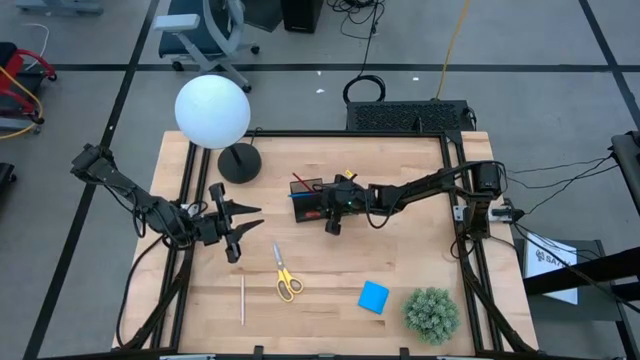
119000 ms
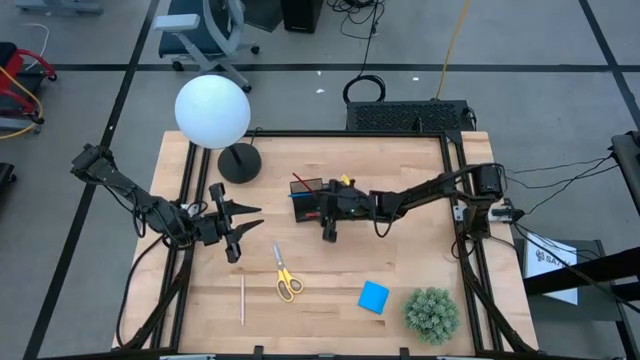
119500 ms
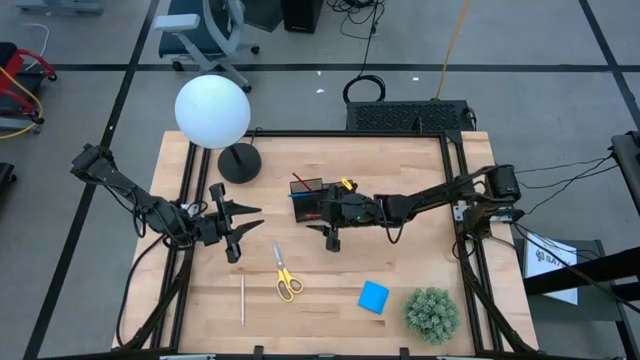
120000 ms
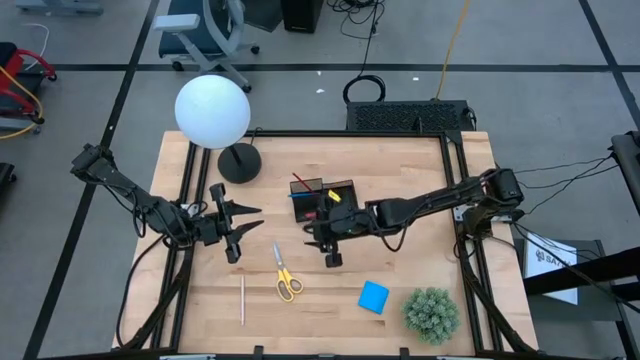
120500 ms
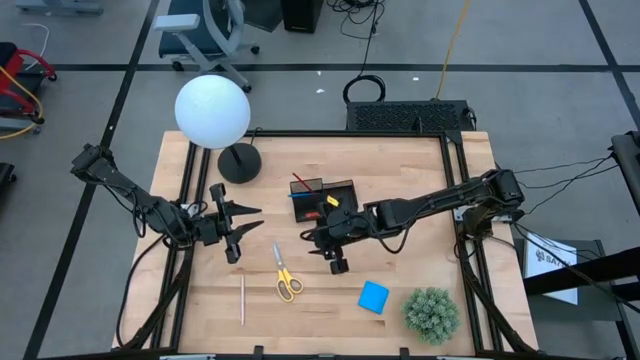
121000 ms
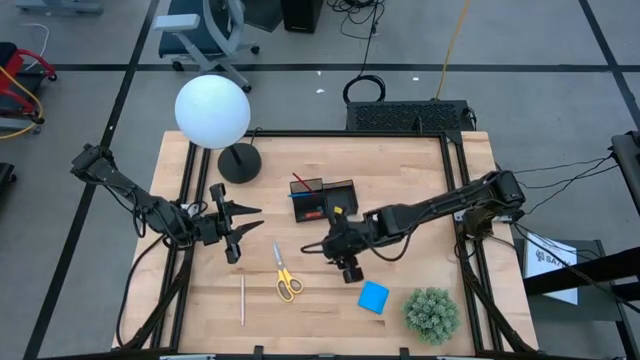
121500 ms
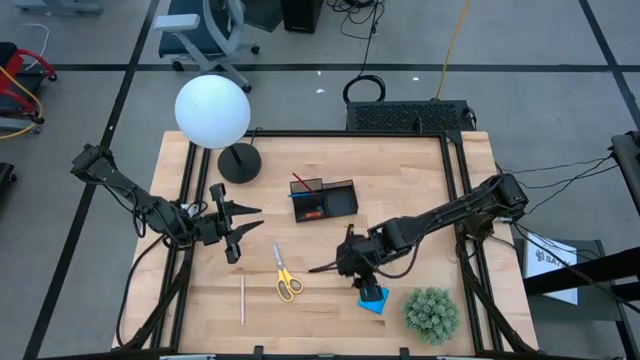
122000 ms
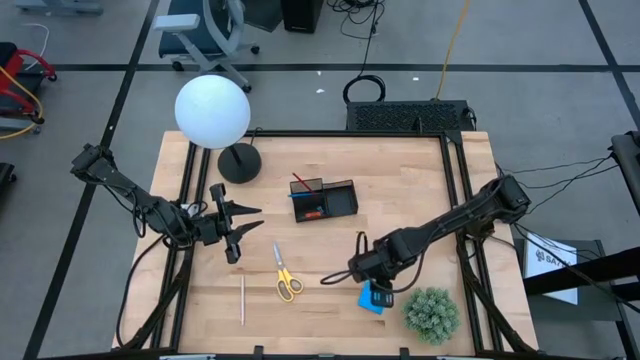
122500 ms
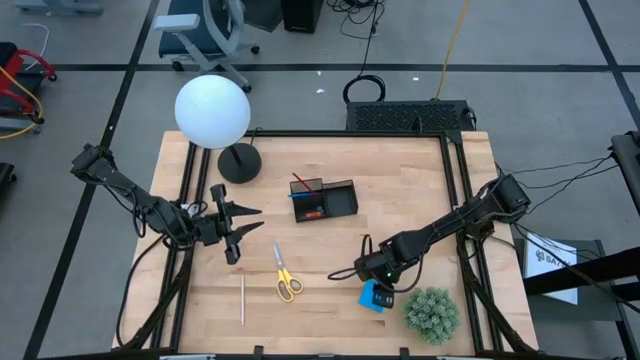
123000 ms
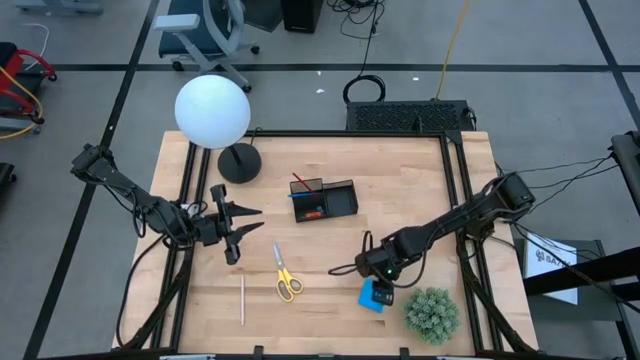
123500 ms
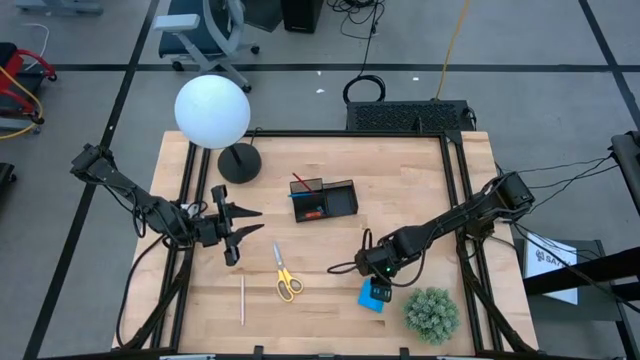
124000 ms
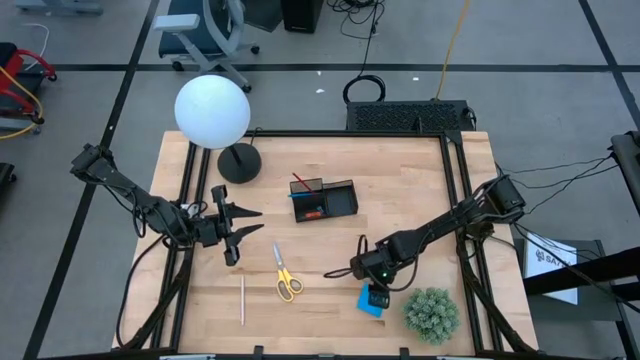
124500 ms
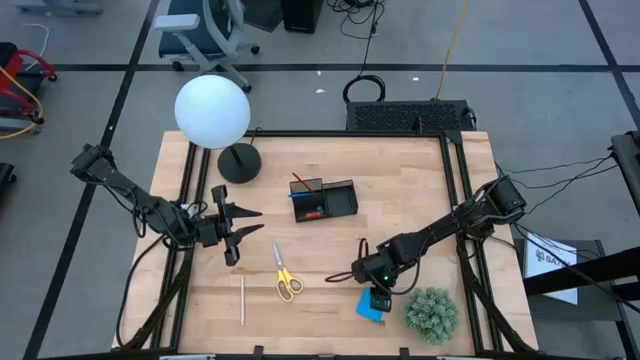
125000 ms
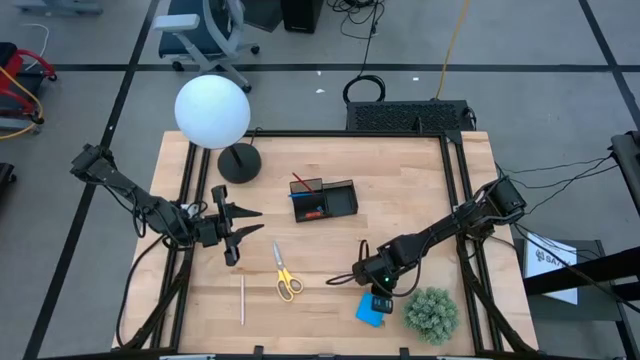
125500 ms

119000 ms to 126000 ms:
Task: Pick and place office supplies into organizer
Put the blue notepad into the desk organizer

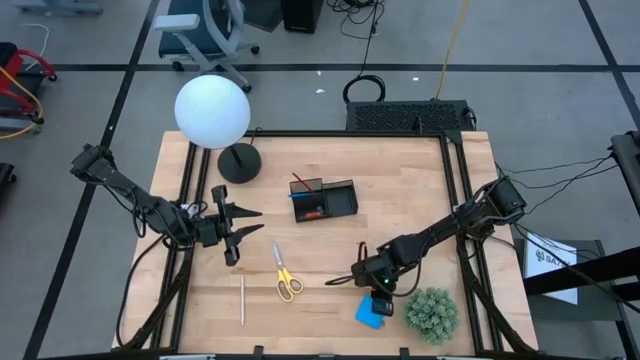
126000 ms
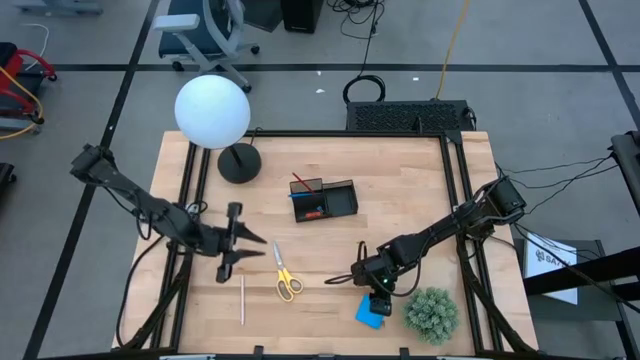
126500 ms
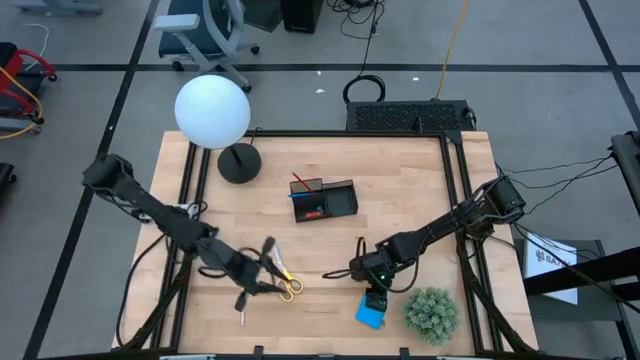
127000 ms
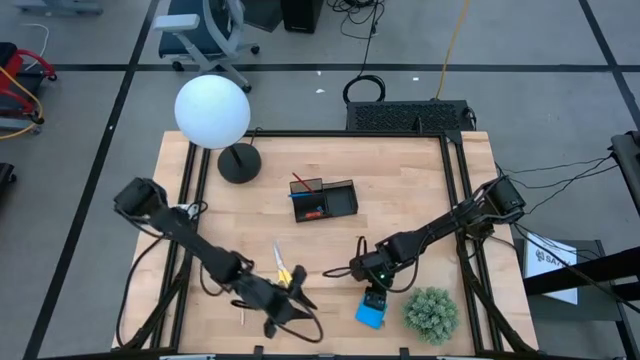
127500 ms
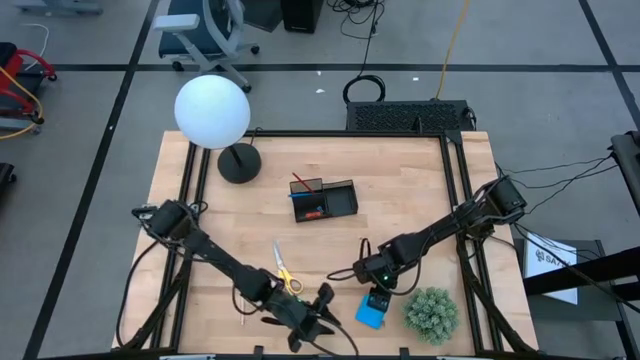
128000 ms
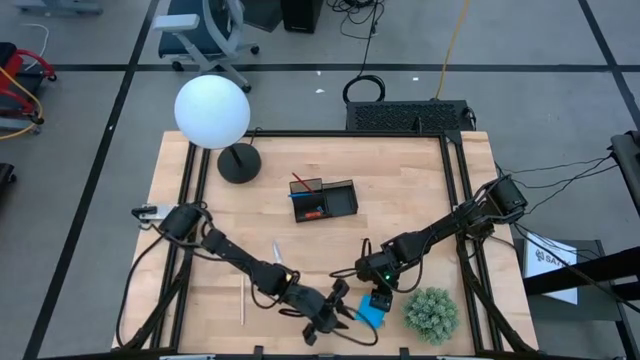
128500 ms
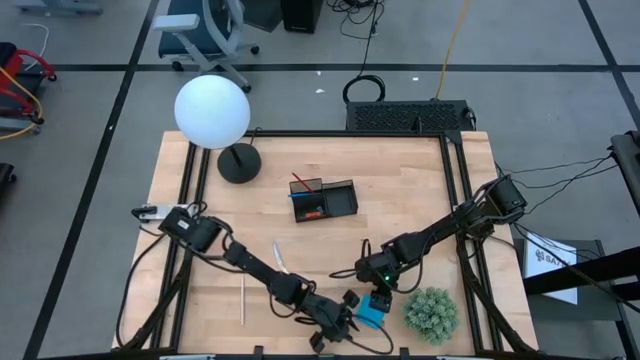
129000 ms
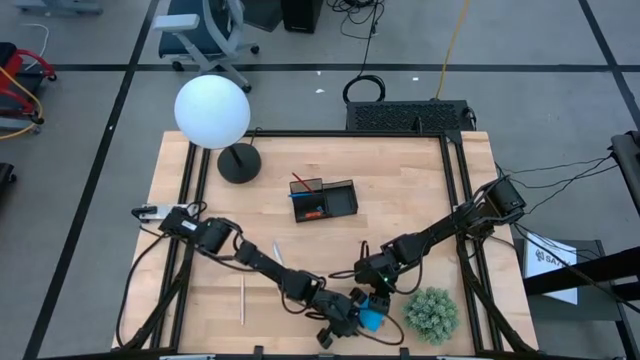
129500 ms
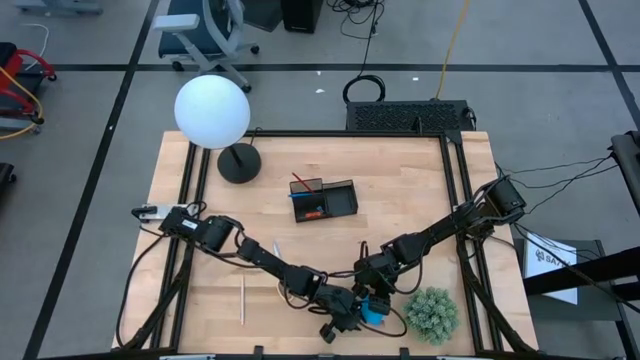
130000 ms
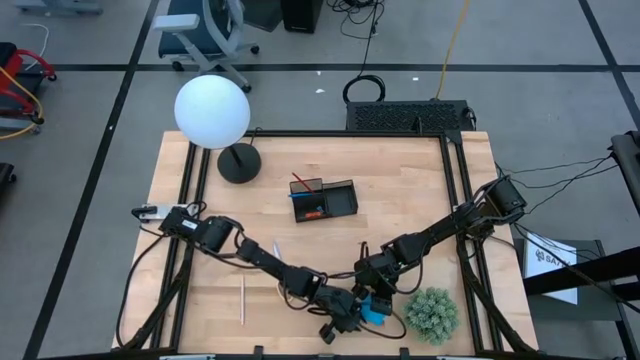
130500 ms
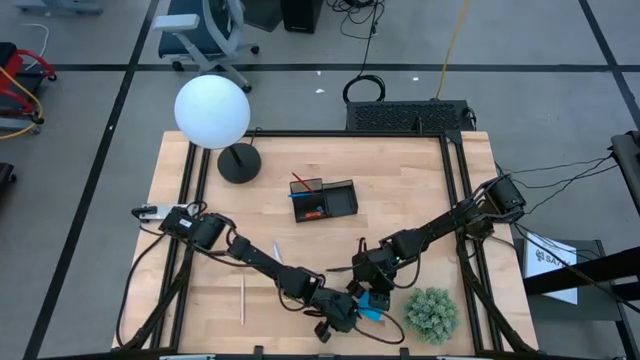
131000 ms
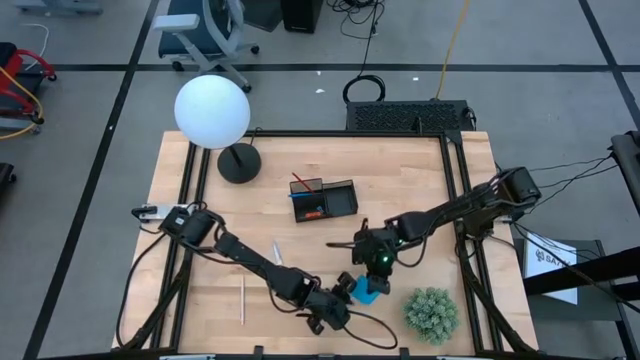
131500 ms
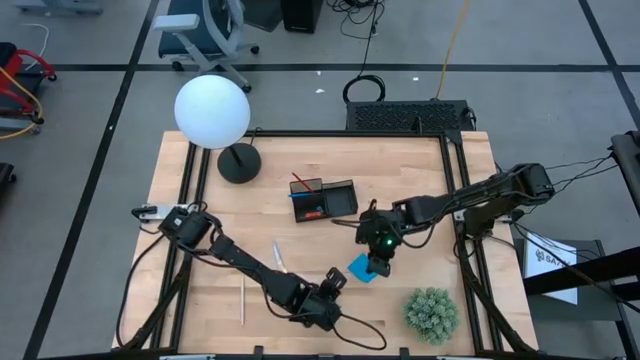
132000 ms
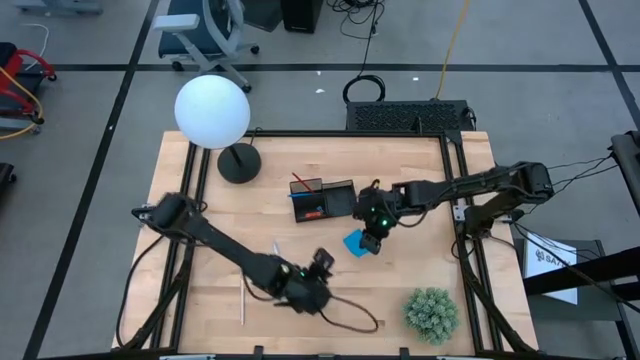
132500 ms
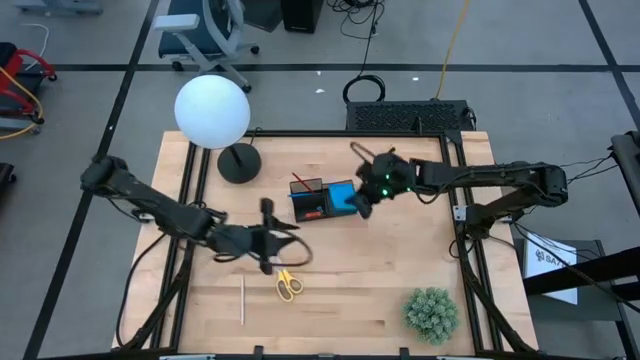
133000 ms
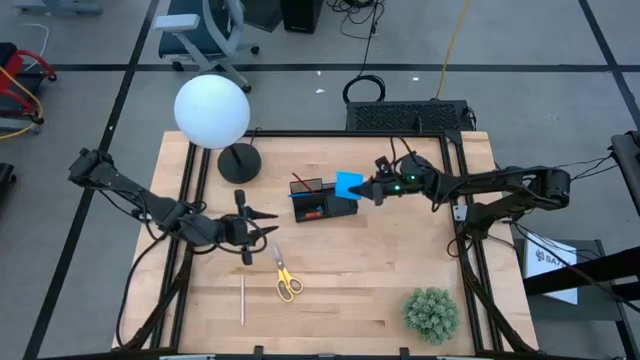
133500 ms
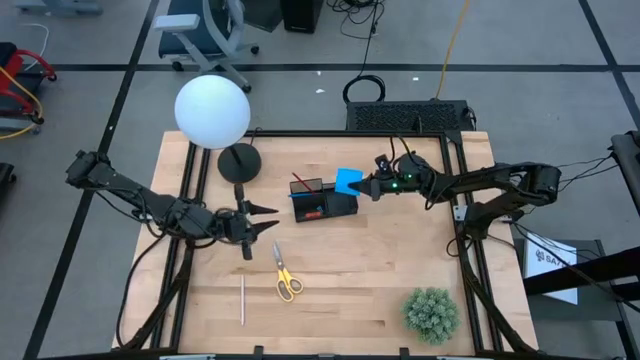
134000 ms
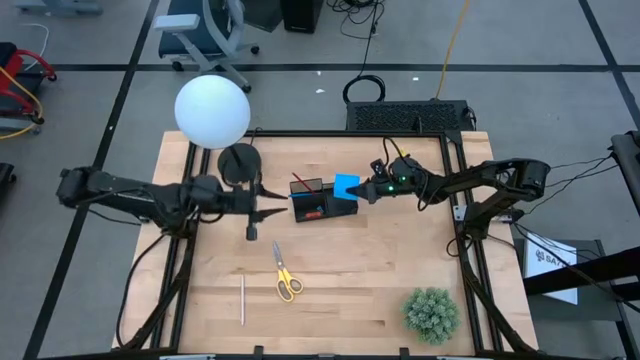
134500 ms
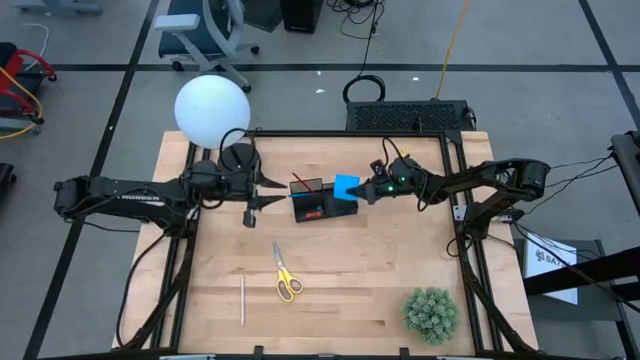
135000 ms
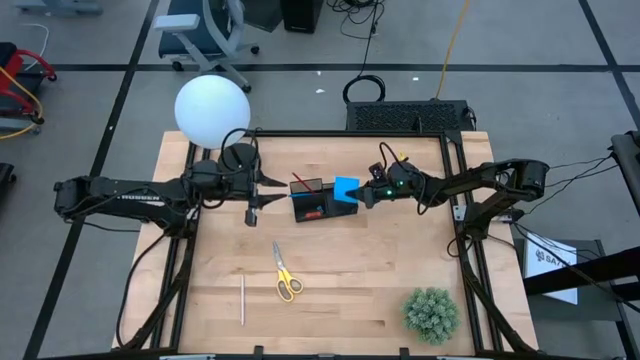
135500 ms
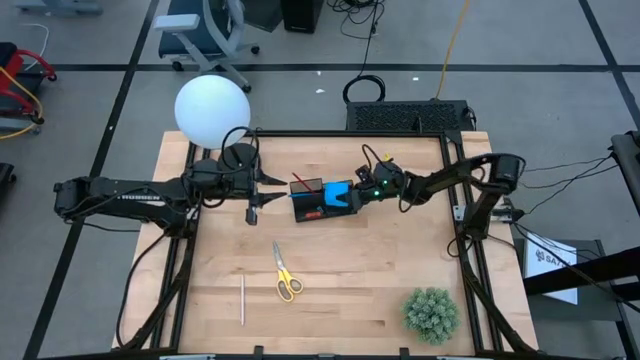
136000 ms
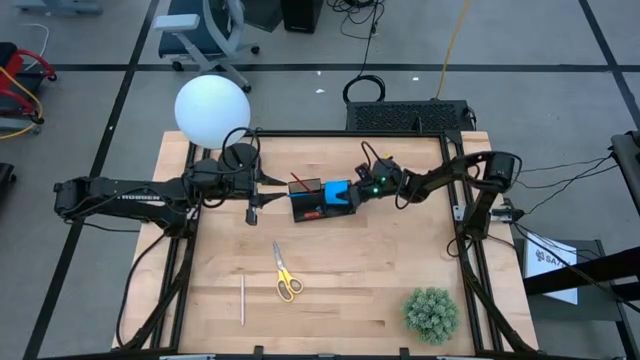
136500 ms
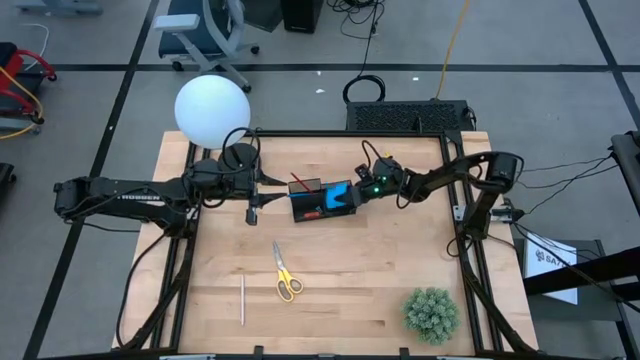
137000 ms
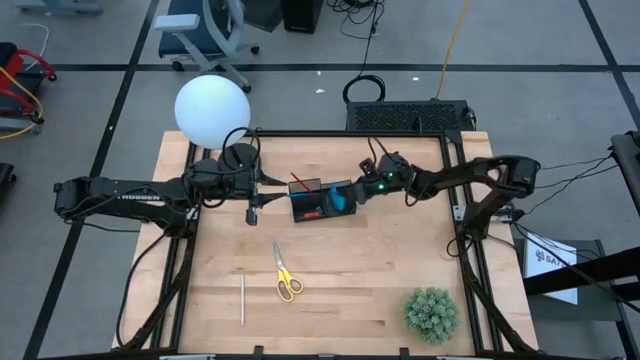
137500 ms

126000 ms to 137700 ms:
Put the blue notepad into the desk organizer

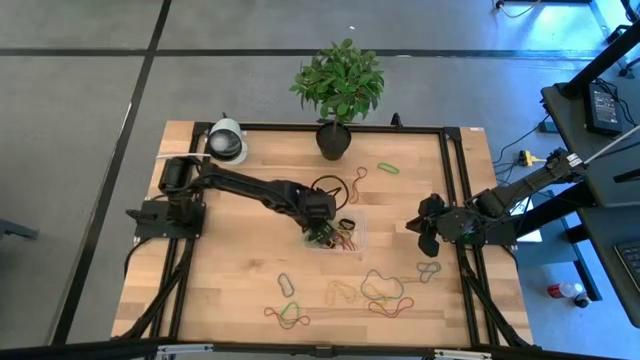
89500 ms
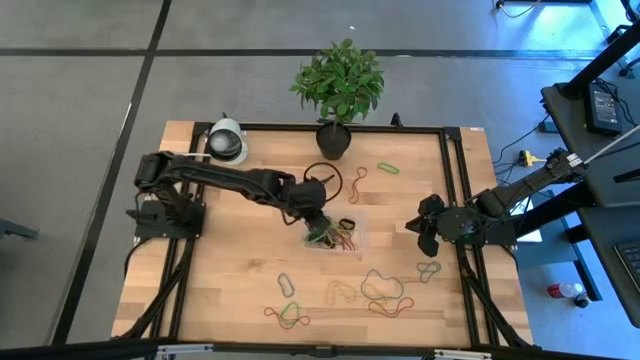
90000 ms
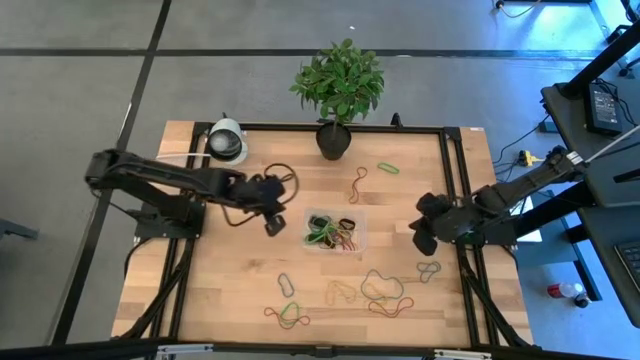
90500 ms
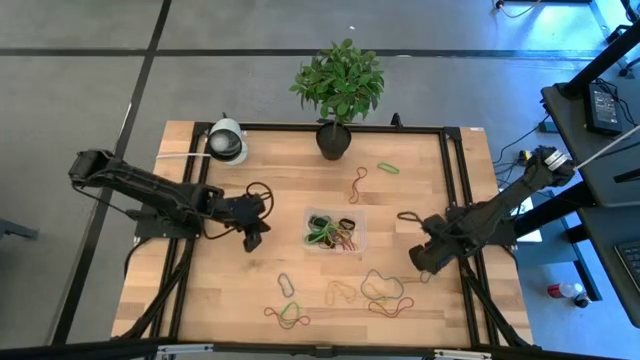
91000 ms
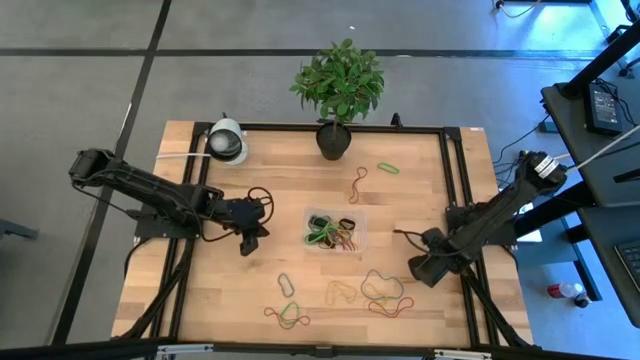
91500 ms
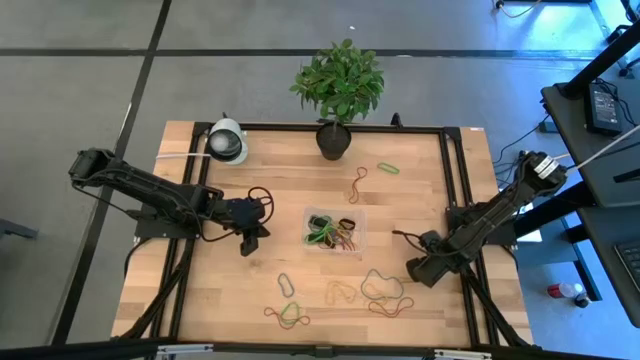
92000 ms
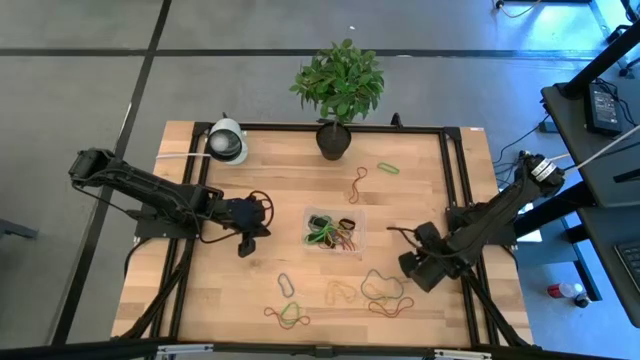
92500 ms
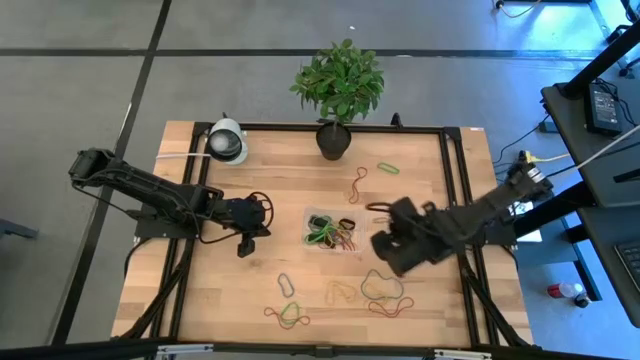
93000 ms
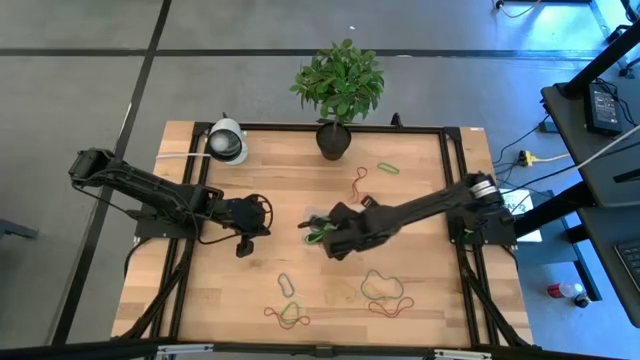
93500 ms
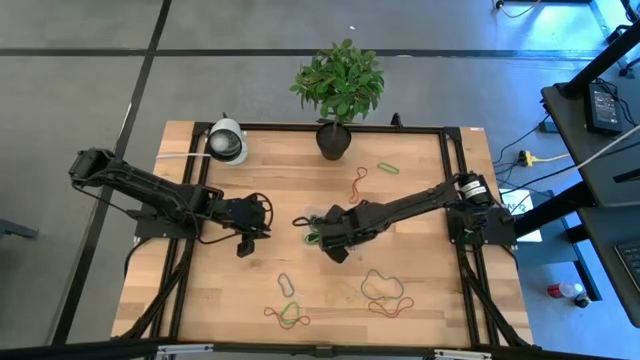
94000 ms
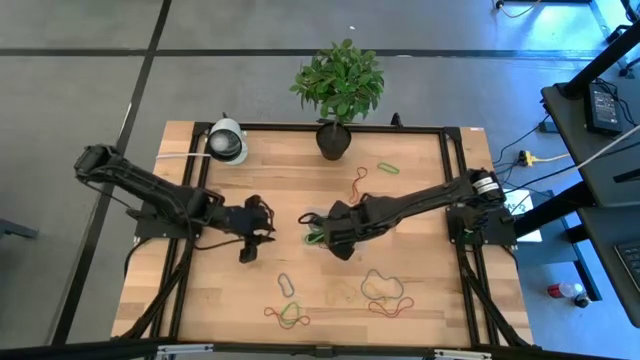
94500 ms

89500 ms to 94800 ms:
Task: Pick and place rubber bands into bin
Put the blue rubber band into the bin
